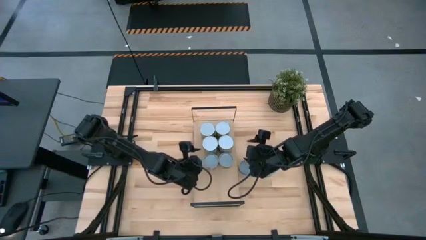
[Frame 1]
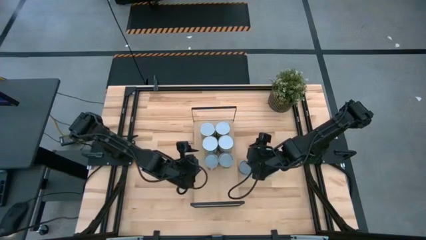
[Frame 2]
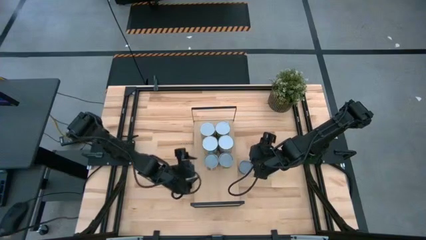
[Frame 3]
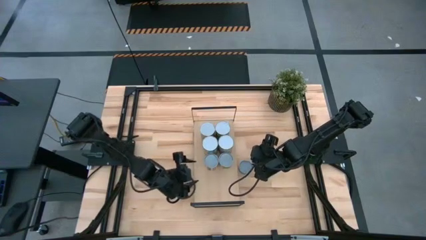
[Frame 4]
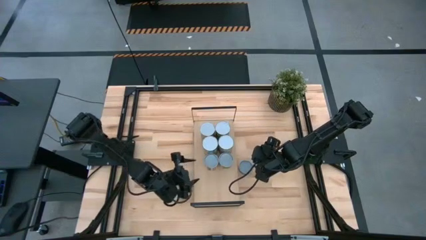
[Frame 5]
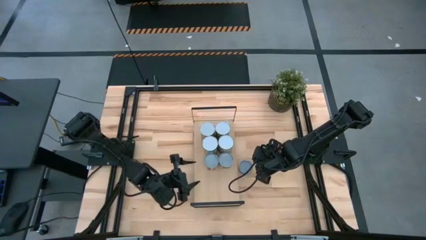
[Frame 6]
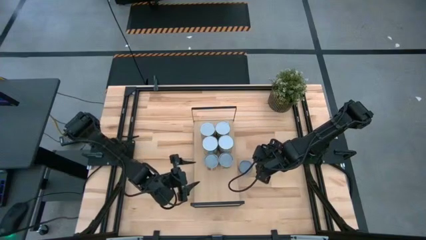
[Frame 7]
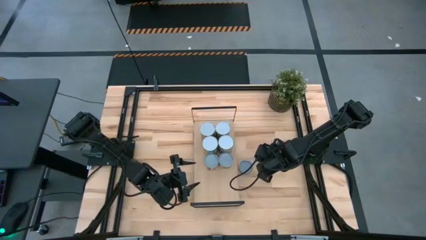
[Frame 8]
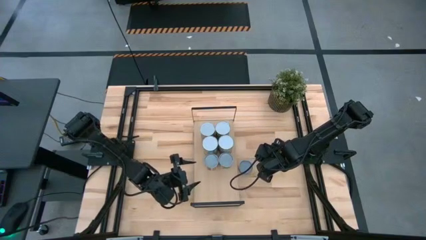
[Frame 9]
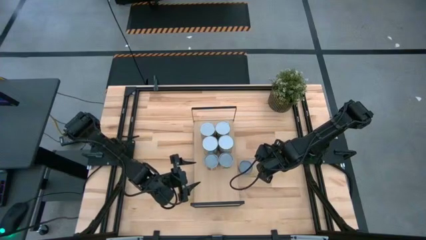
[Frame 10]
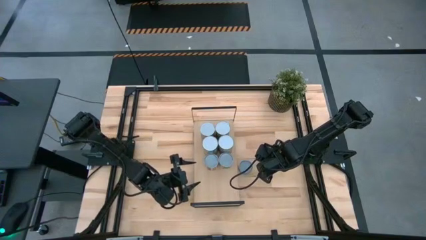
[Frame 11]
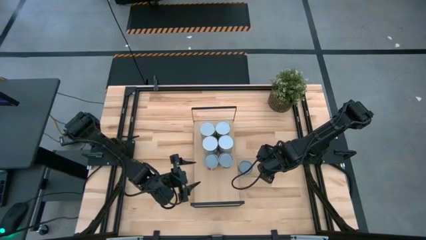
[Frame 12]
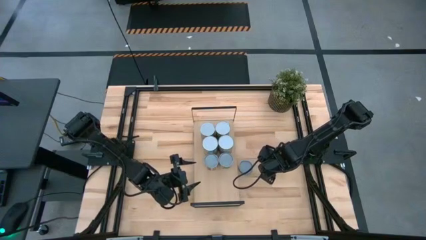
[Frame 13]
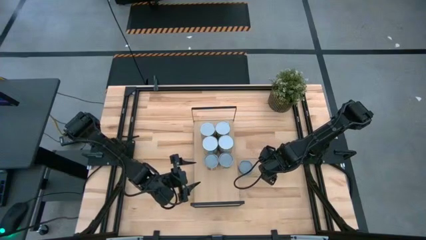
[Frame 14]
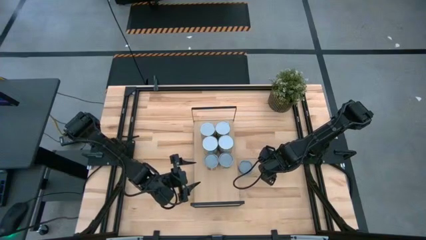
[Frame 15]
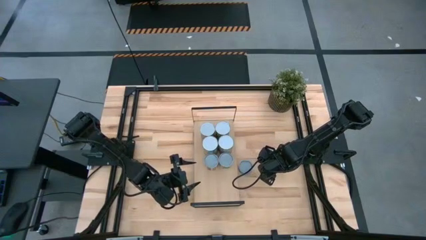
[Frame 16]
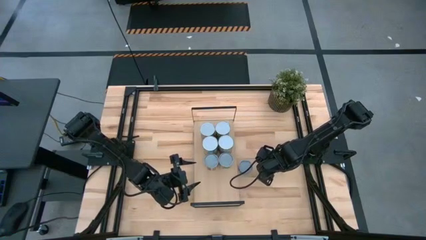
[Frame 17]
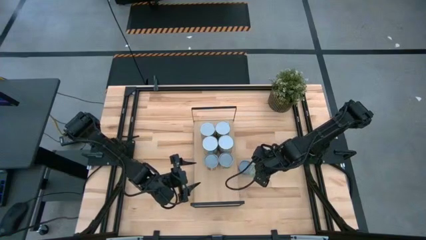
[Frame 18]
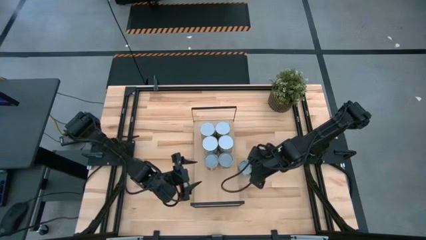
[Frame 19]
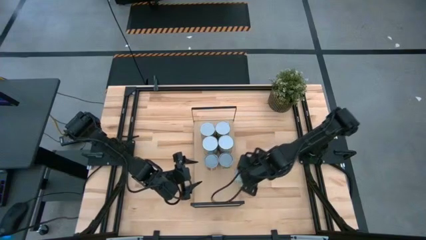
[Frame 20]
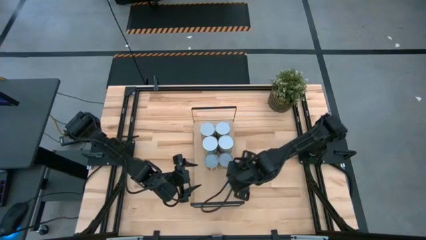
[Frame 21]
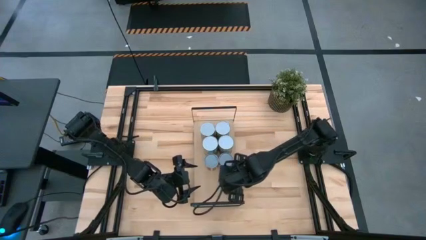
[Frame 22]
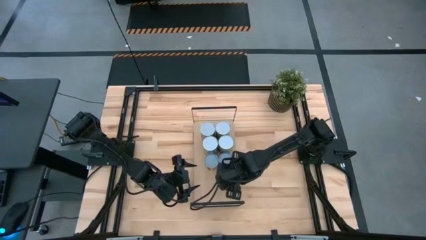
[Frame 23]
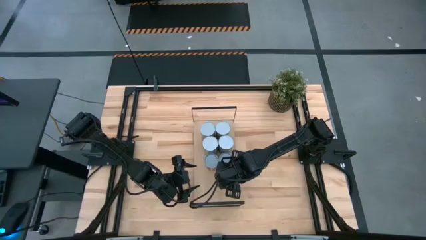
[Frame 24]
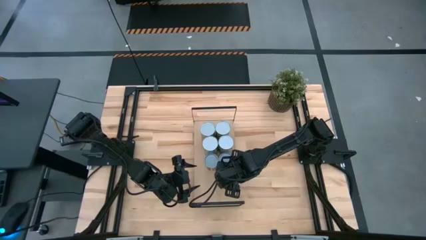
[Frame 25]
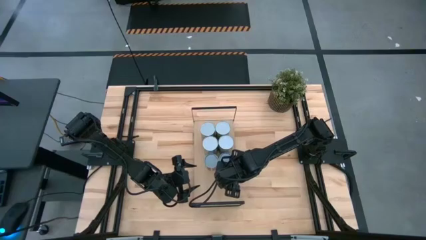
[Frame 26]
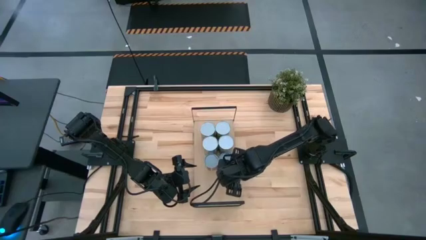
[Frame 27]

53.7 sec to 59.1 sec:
Task: Pick and place cans onto a shelf
Put the canned mix vegetables on the shelf

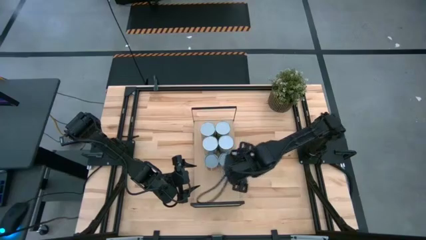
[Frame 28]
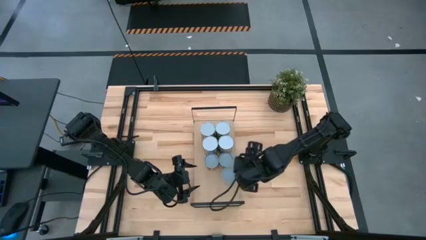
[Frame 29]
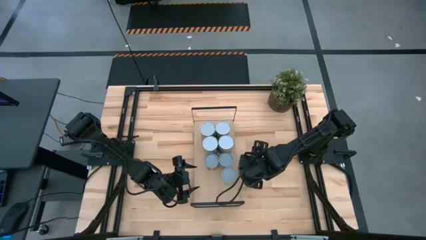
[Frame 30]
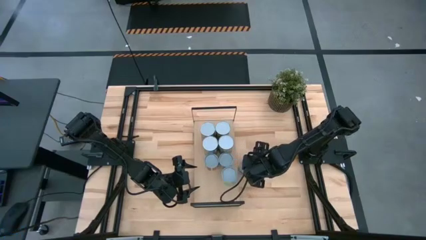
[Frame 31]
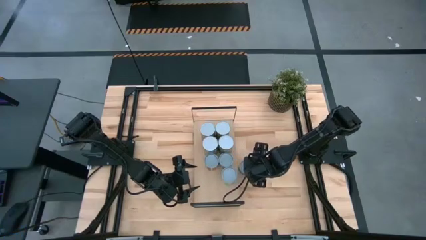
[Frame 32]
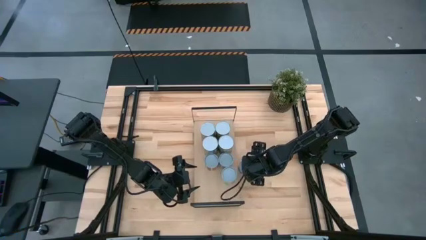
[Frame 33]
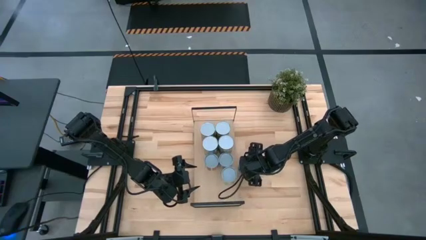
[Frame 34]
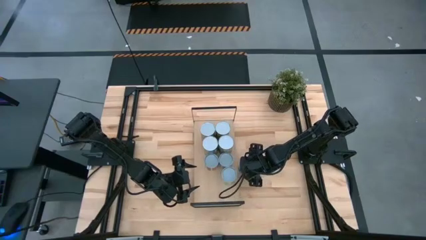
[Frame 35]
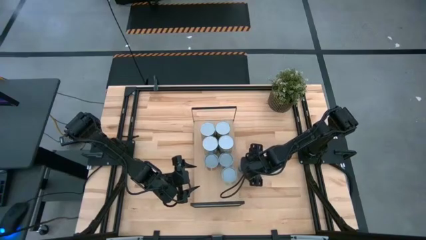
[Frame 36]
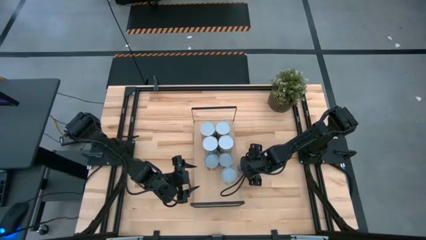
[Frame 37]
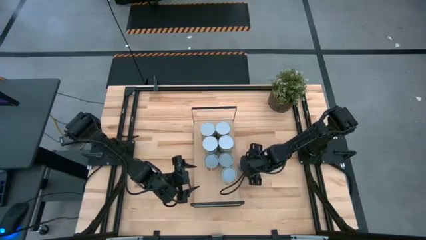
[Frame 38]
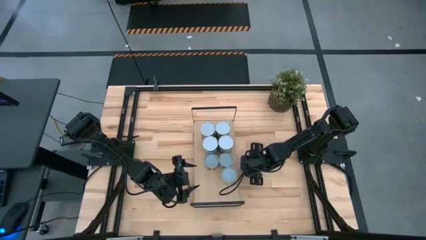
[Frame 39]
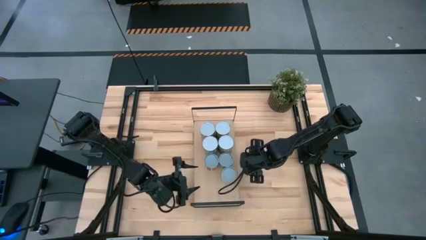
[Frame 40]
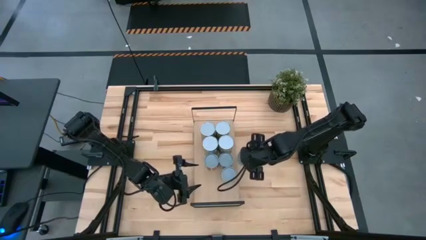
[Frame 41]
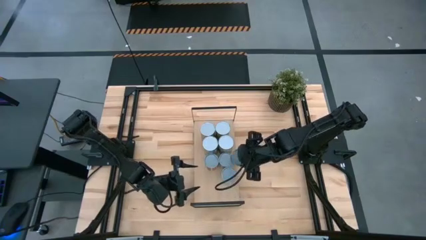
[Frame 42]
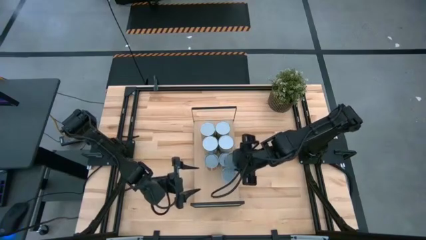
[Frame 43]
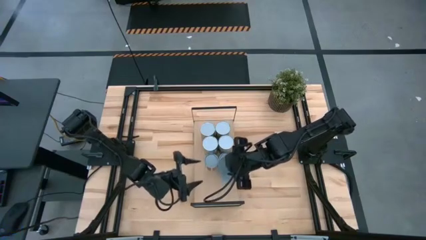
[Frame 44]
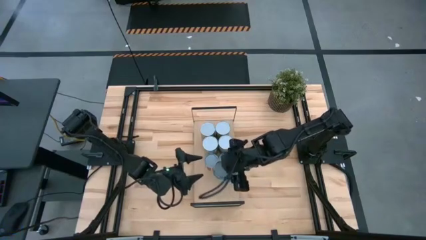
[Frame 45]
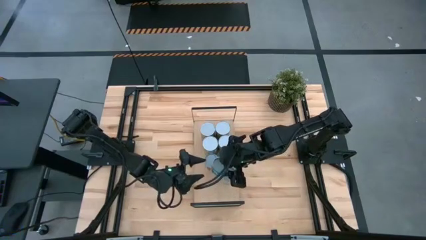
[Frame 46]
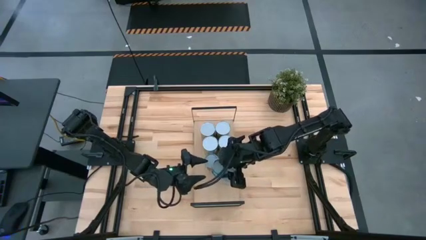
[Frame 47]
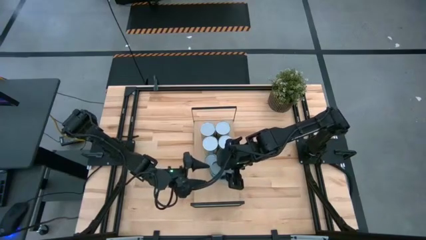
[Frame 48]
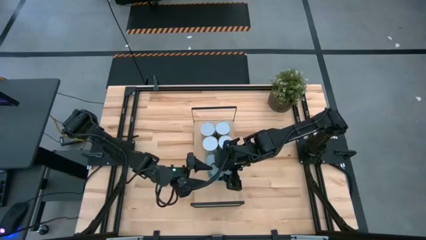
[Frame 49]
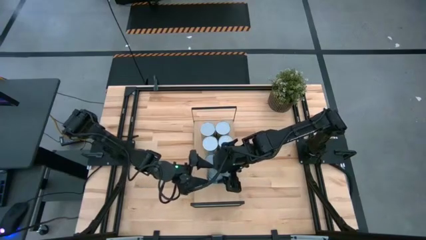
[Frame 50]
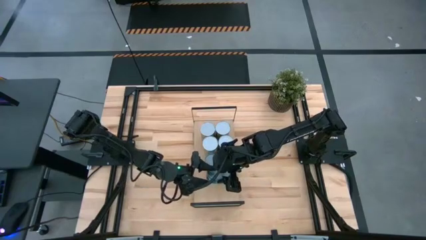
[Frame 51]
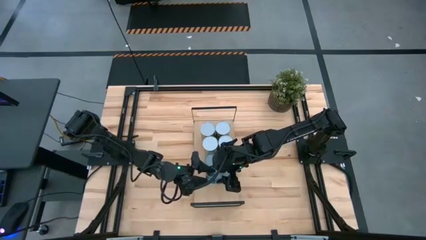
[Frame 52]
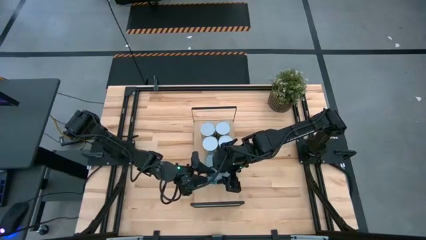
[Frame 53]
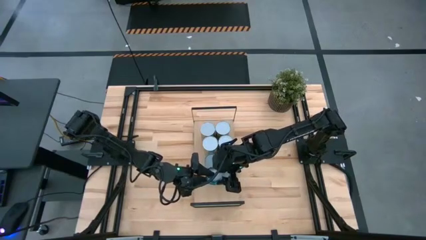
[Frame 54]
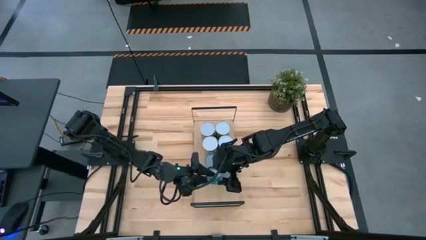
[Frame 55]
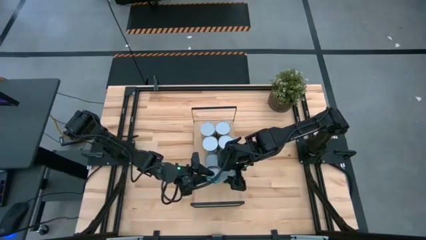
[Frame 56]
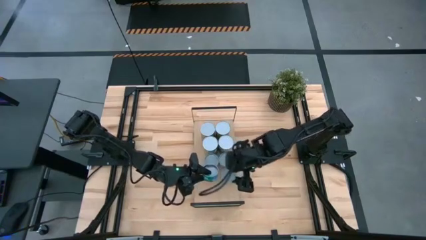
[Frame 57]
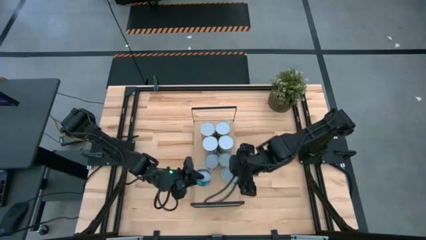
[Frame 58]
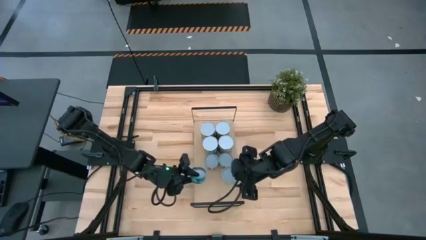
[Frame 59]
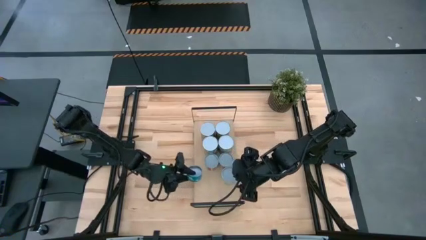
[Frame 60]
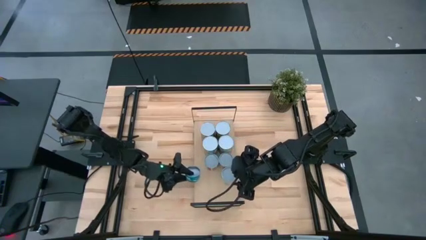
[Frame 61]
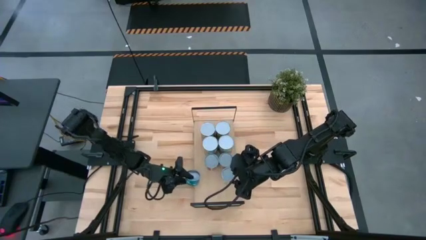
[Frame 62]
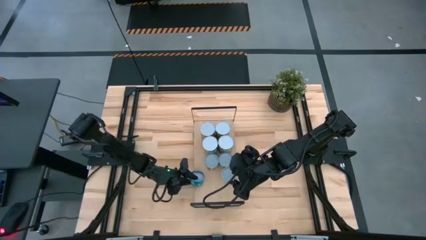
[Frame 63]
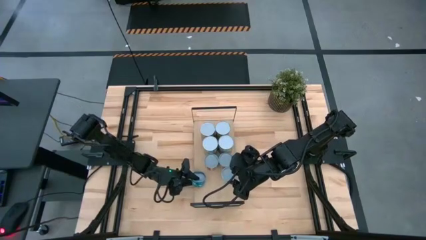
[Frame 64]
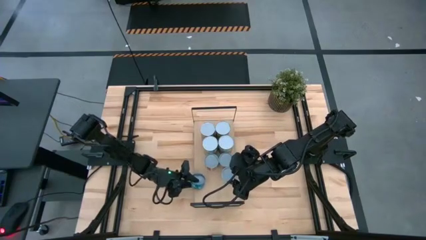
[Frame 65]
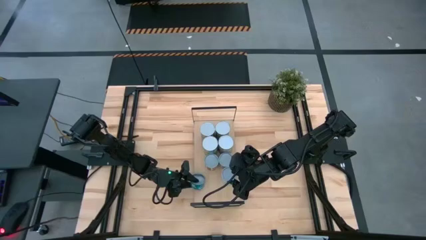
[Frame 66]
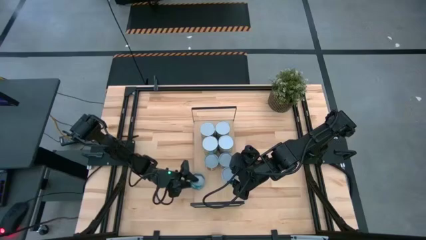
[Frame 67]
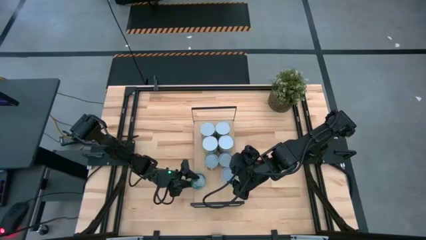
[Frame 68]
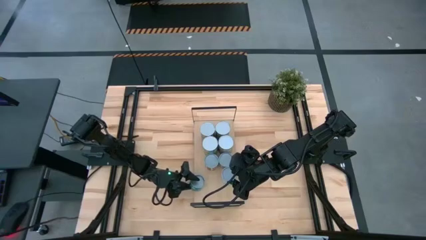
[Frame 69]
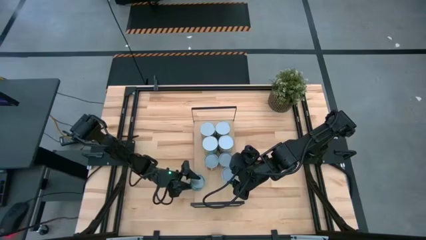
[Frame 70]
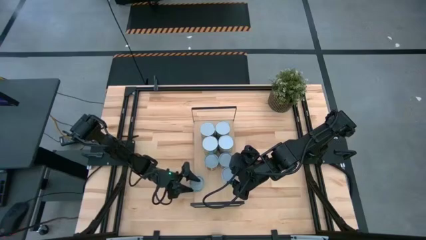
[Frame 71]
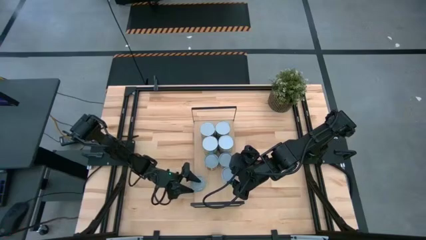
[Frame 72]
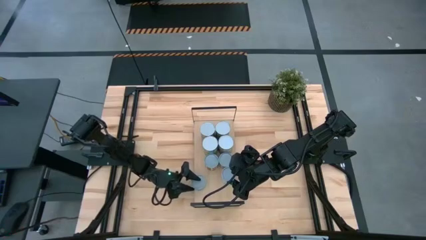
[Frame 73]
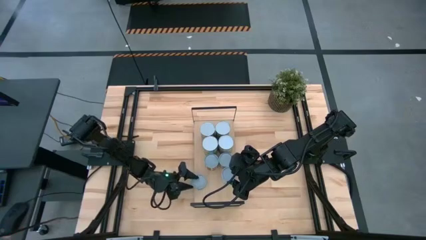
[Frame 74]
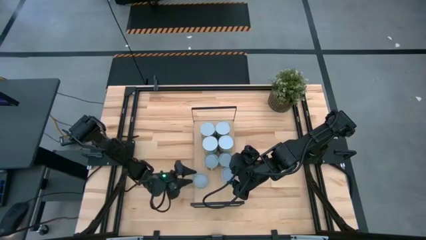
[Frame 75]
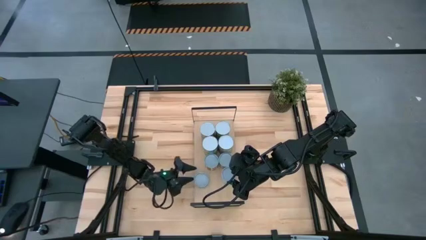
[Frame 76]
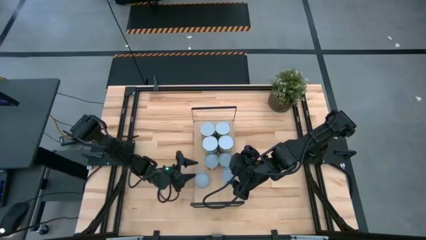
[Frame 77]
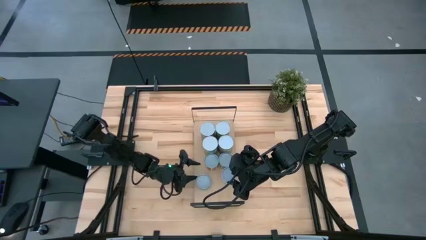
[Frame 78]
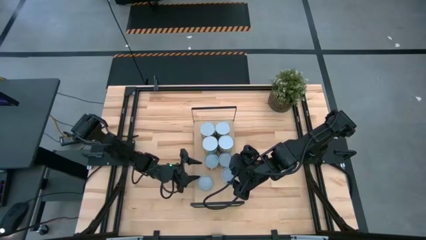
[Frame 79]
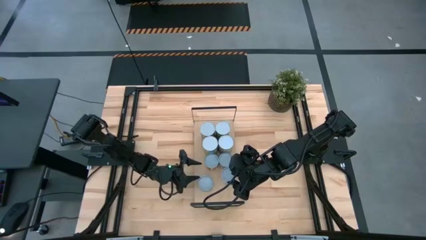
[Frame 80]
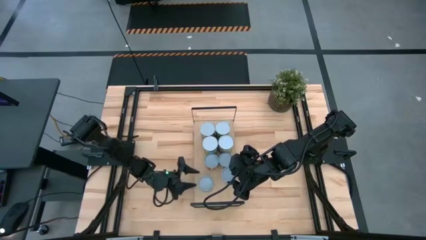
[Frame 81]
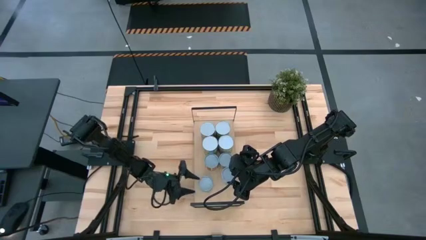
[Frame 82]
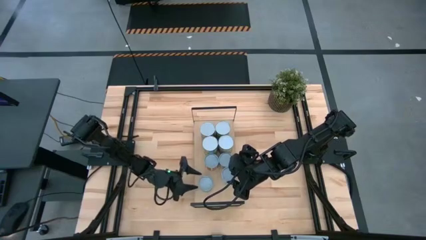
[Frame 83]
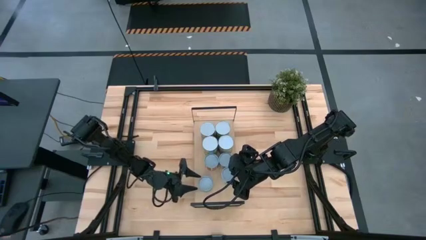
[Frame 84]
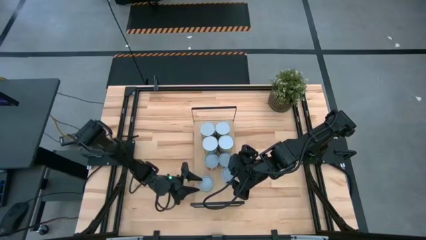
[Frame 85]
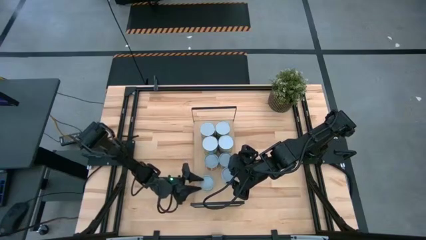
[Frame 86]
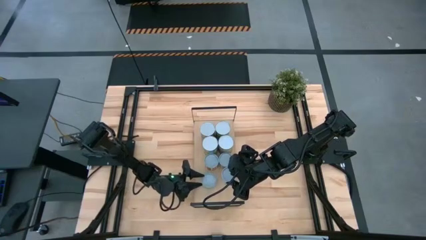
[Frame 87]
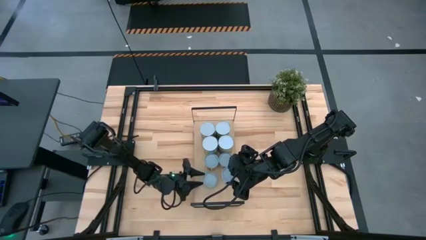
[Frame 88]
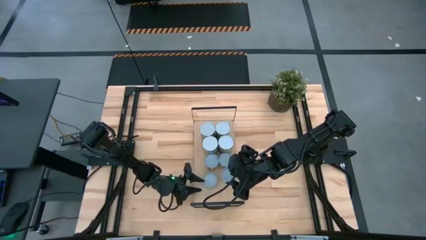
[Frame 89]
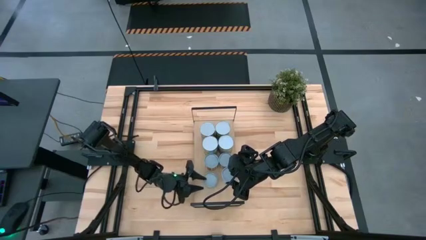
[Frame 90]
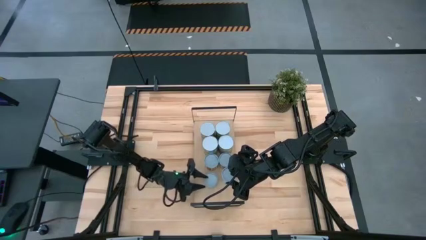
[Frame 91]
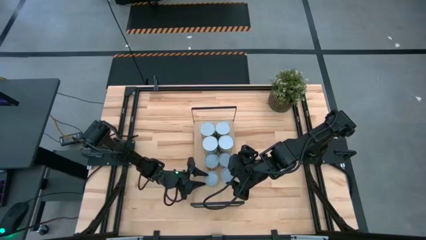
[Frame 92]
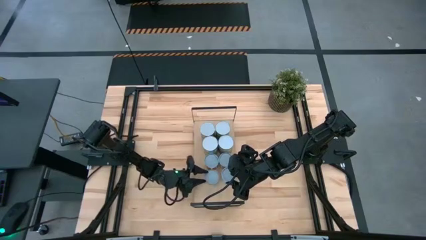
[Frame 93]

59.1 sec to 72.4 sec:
Put the canned tuna on the shelf
